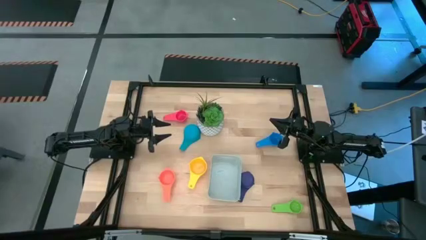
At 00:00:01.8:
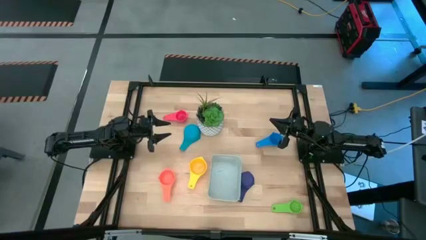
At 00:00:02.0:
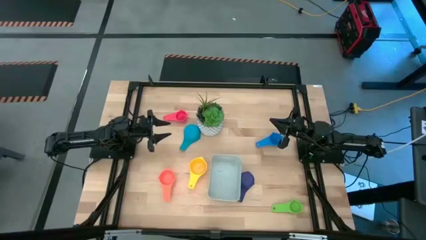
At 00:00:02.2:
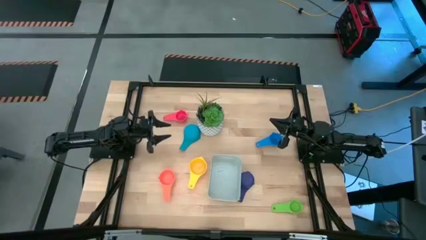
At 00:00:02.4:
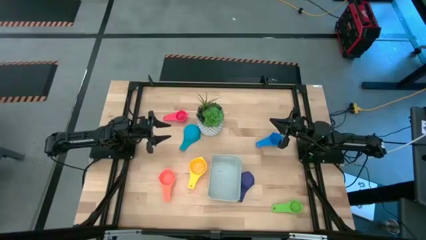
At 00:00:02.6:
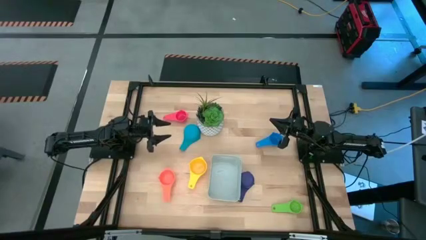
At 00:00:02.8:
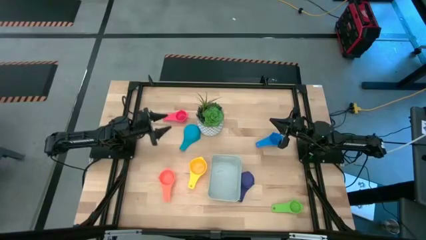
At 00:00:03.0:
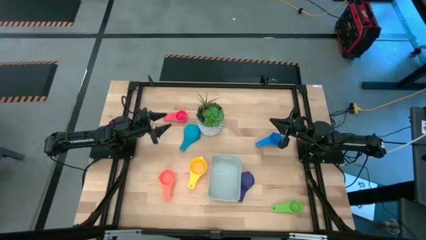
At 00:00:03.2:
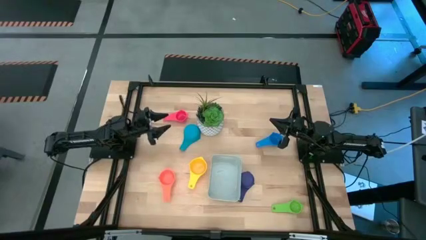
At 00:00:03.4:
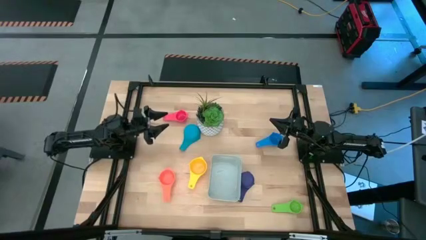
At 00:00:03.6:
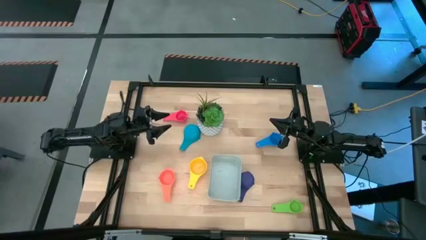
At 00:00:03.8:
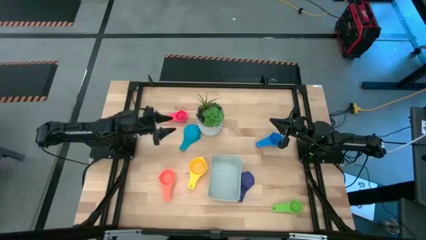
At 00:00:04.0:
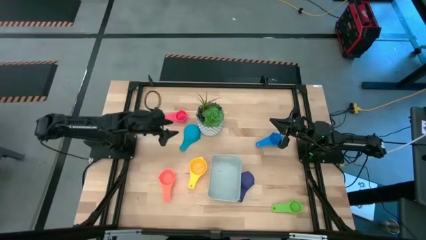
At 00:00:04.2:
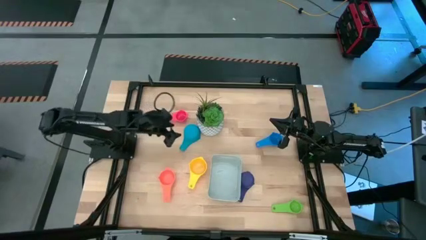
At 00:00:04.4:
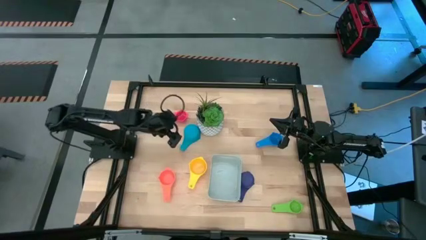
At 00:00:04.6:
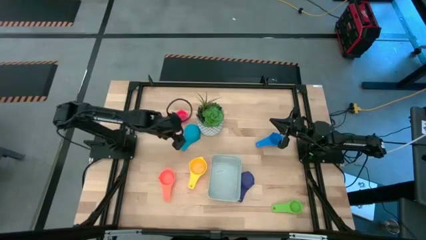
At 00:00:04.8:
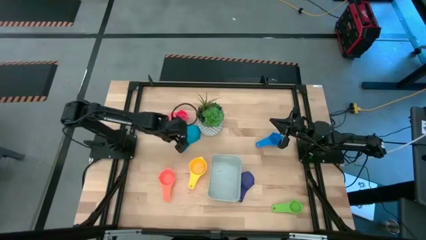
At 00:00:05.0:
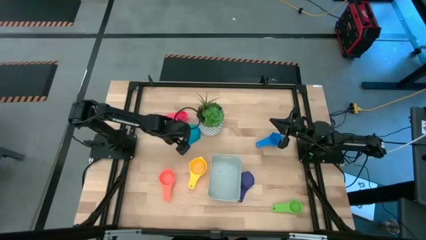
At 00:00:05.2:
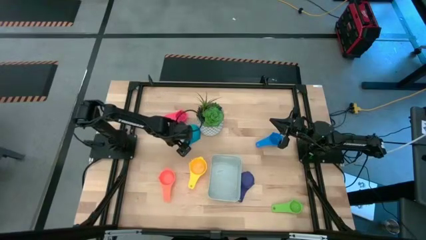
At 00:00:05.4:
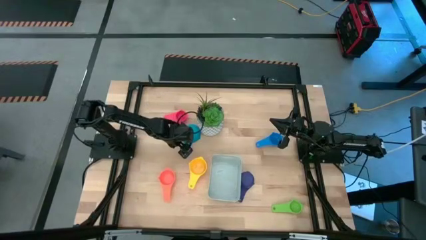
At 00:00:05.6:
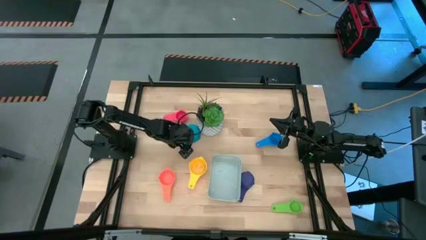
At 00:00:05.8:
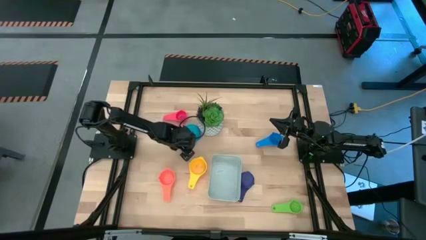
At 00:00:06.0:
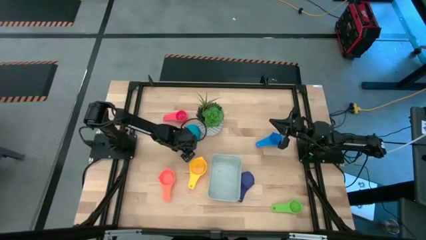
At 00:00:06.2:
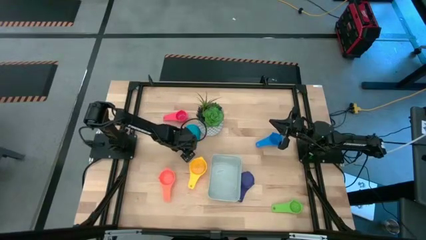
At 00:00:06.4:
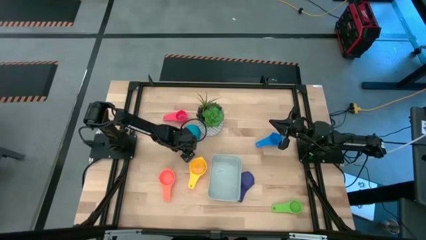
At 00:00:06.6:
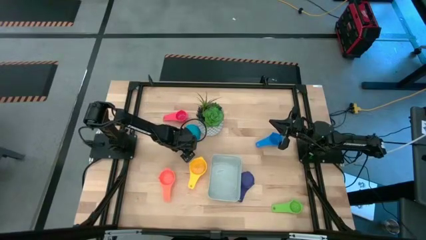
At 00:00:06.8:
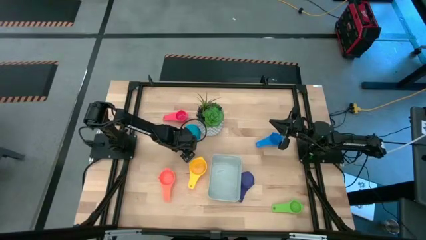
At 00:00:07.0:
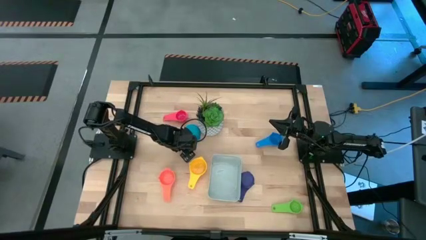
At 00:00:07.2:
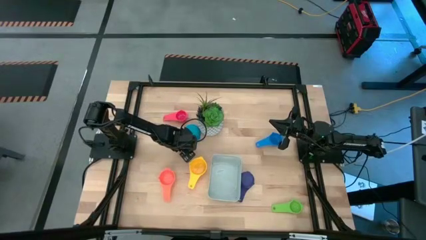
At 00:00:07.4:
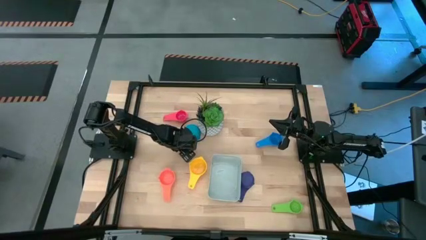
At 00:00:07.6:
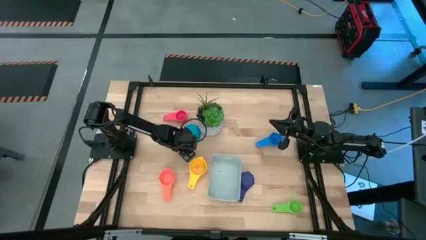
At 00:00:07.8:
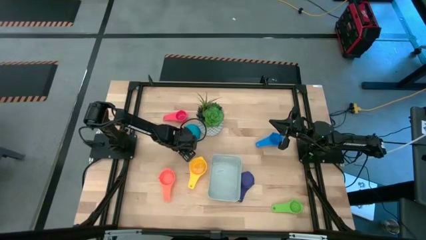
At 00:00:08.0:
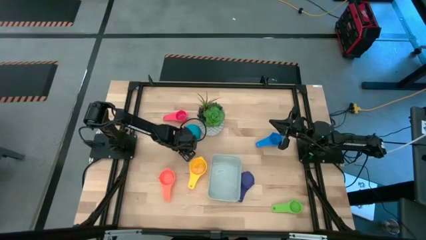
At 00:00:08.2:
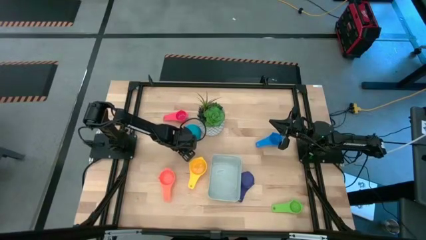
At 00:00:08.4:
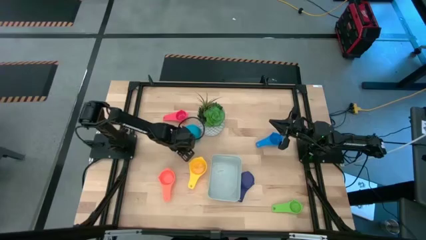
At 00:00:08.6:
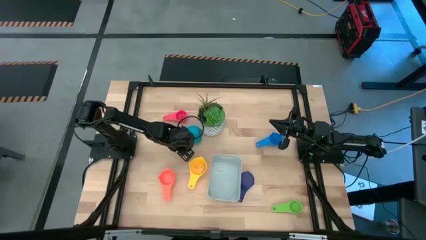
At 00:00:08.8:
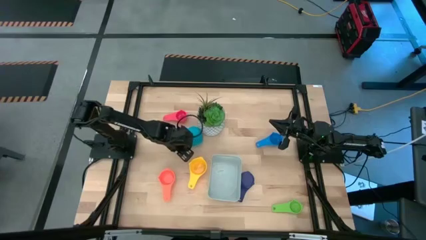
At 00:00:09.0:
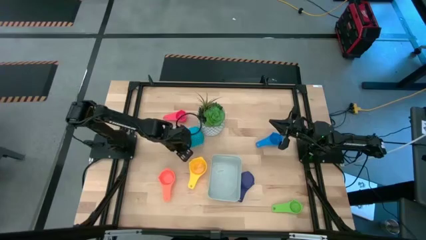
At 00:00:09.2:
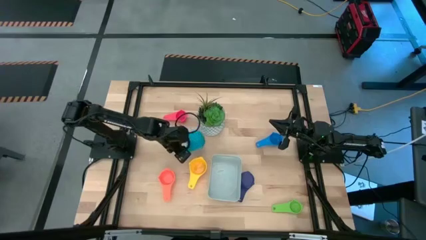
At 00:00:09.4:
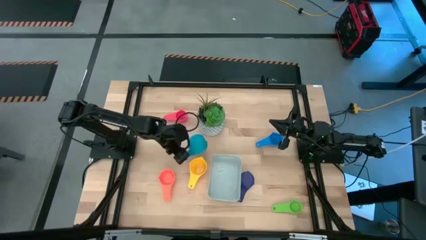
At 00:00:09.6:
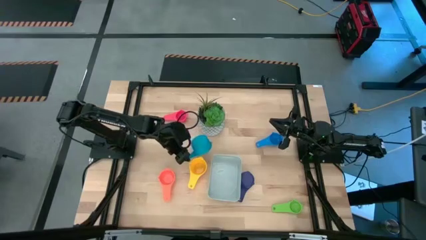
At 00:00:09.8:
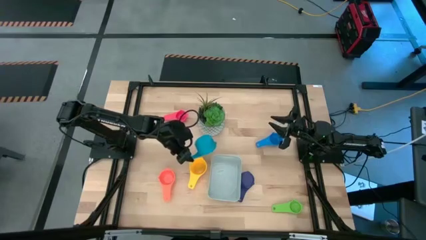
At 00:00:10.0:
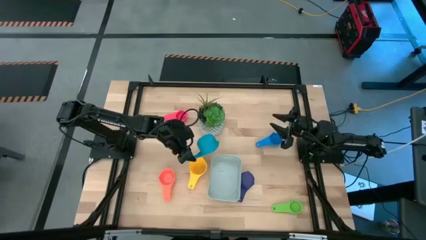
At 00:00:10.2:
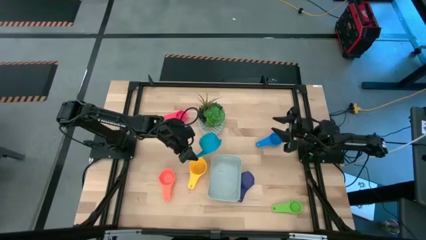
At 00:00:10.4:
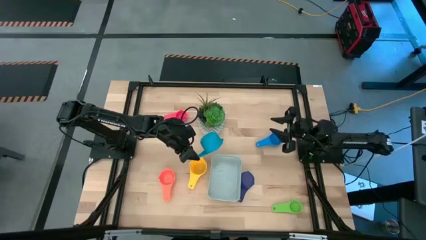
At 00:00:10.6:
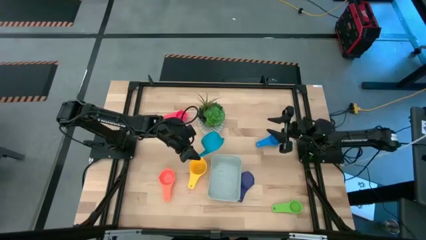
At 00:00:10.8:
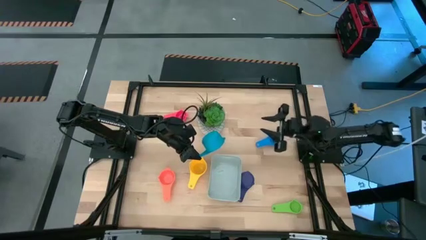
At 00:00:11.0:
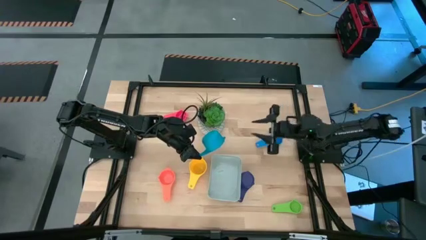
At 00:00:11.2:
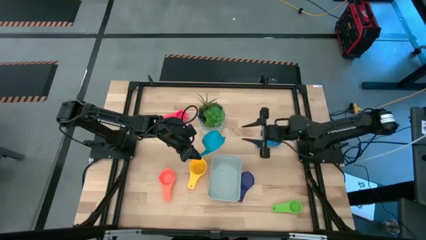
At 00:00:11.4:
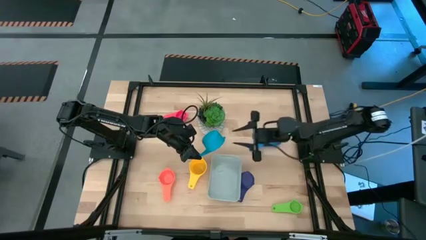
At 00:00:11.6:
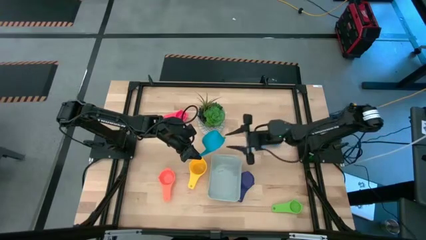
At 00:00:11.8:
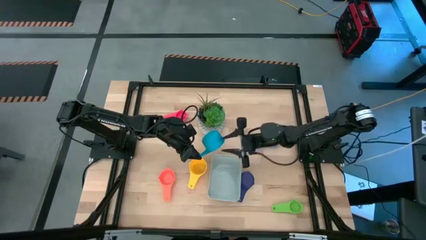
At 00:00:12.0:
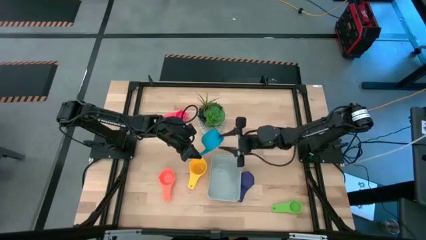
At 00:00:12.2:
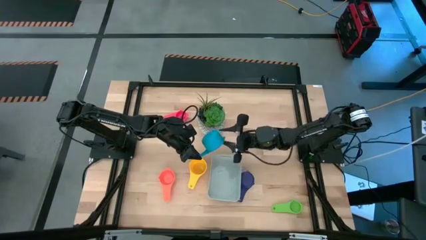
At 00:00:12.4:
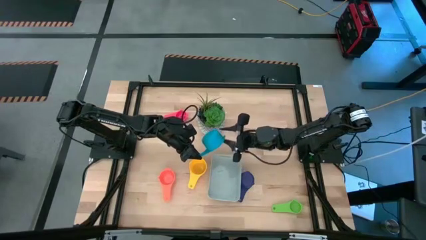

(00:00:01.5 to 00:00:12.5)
Task: Nest measuring cups in basket
Adjust the light blue measuring cup
